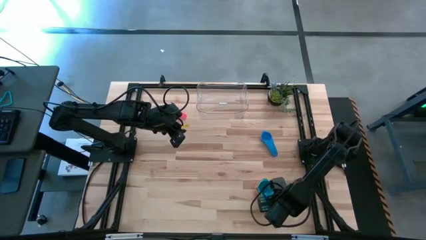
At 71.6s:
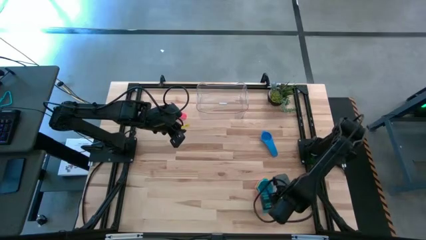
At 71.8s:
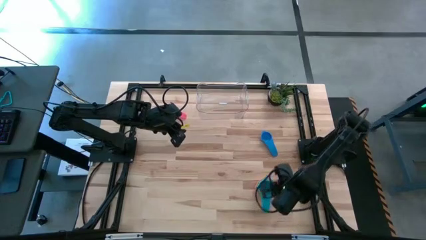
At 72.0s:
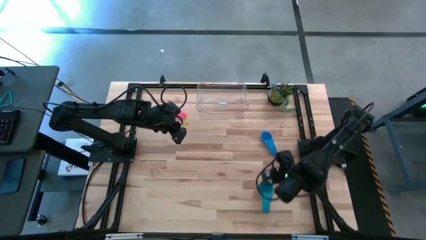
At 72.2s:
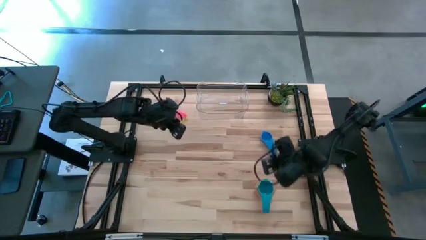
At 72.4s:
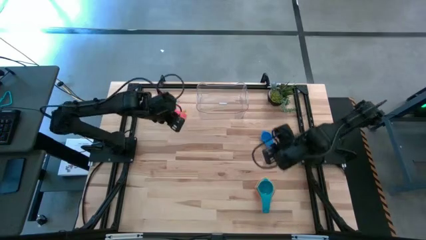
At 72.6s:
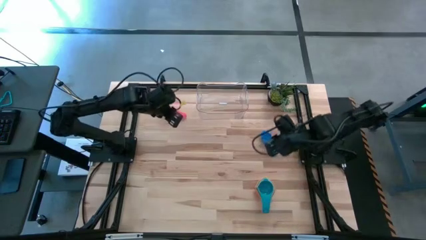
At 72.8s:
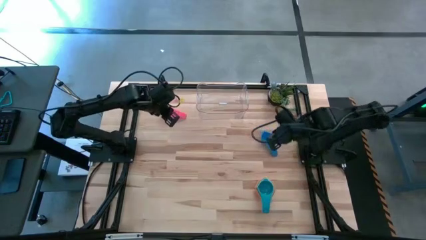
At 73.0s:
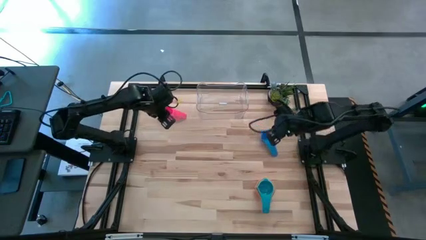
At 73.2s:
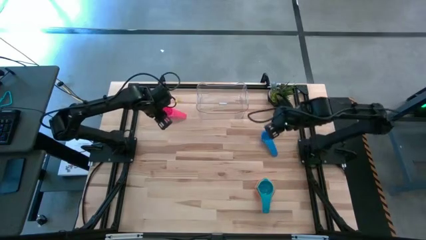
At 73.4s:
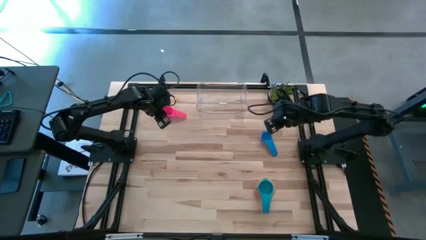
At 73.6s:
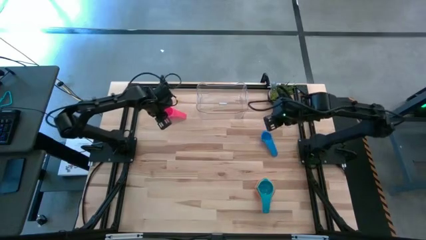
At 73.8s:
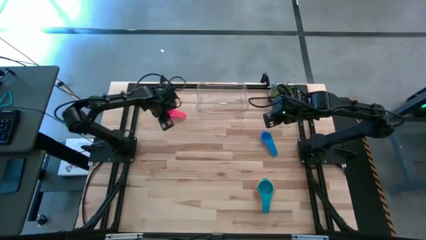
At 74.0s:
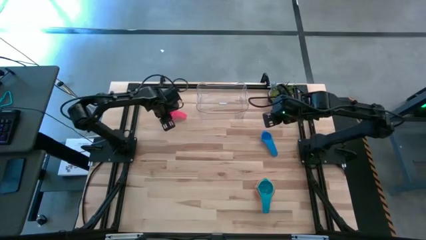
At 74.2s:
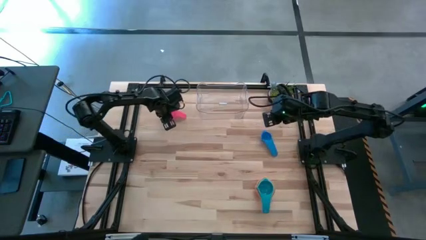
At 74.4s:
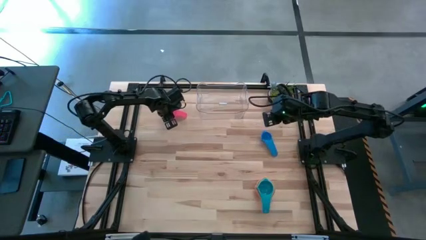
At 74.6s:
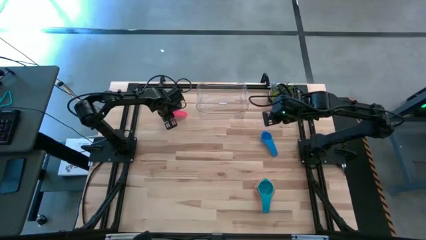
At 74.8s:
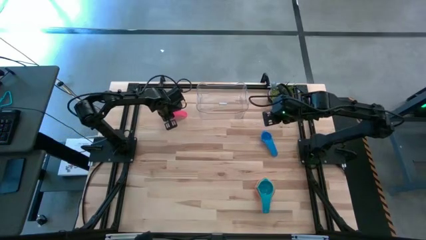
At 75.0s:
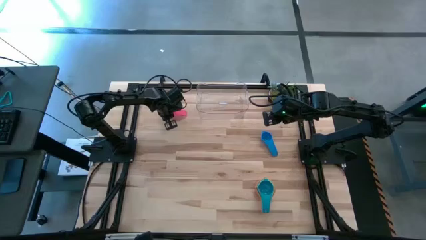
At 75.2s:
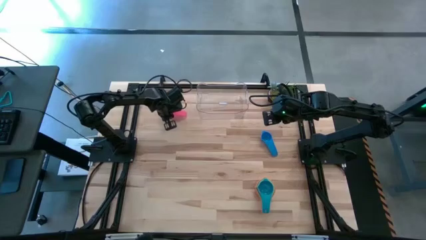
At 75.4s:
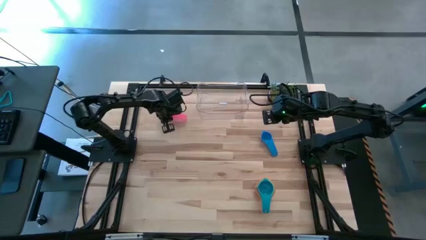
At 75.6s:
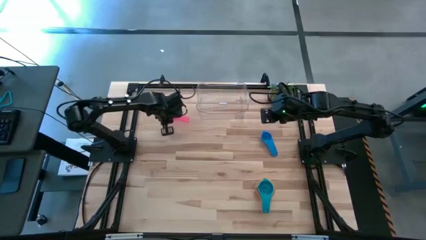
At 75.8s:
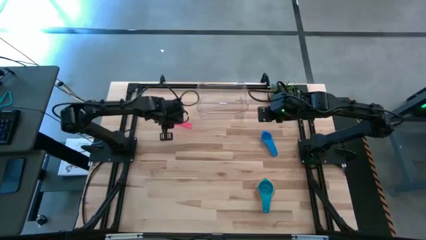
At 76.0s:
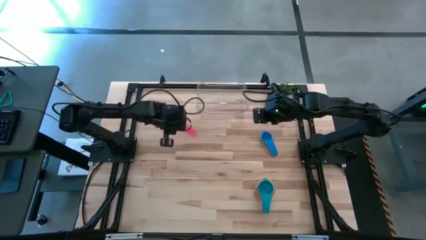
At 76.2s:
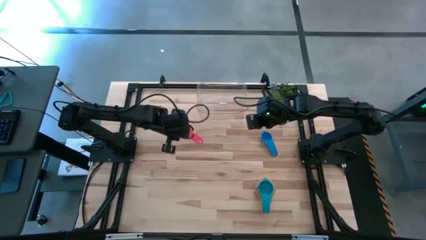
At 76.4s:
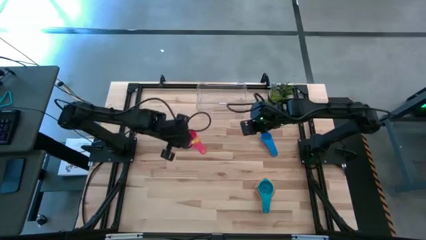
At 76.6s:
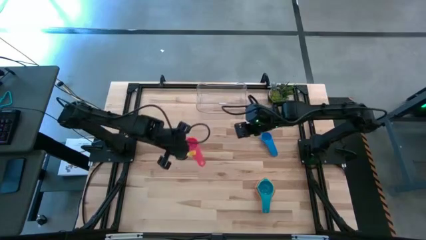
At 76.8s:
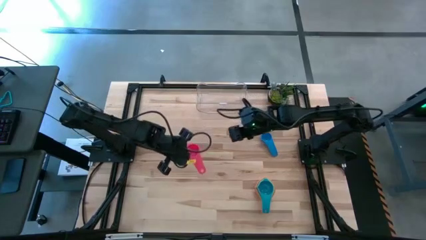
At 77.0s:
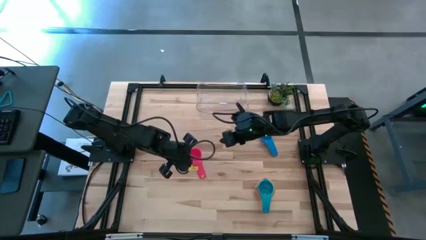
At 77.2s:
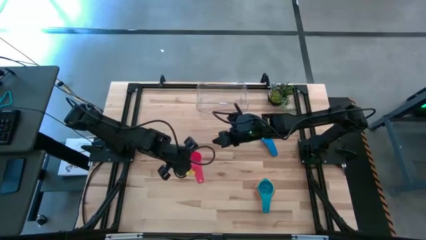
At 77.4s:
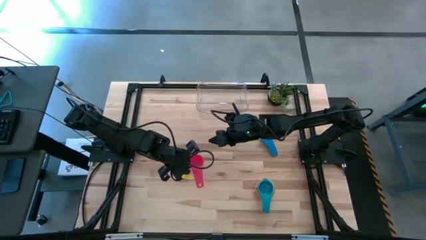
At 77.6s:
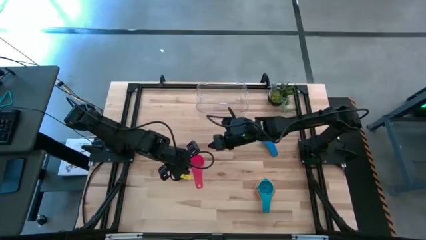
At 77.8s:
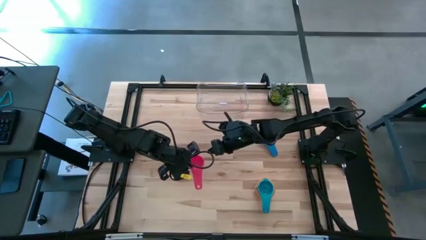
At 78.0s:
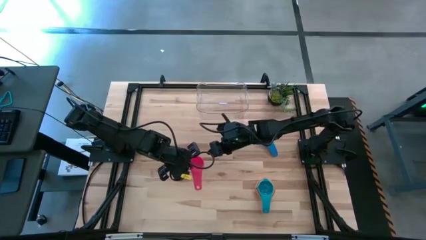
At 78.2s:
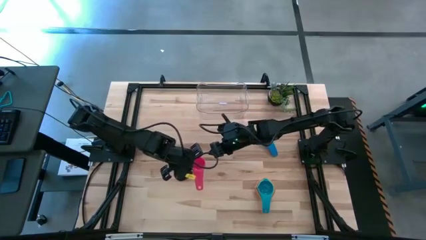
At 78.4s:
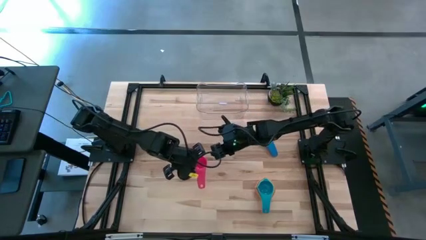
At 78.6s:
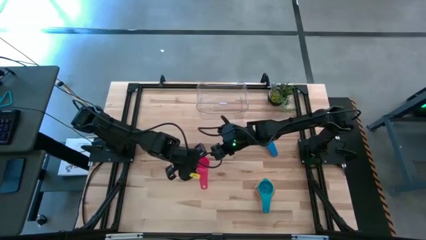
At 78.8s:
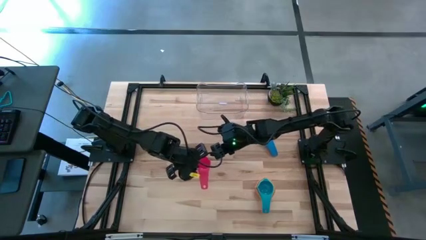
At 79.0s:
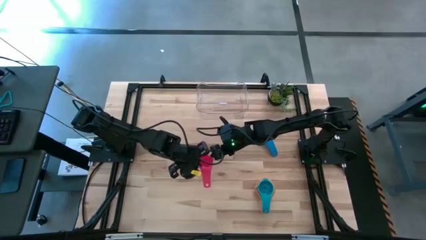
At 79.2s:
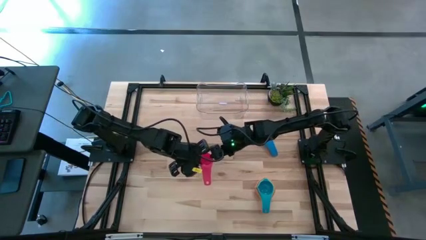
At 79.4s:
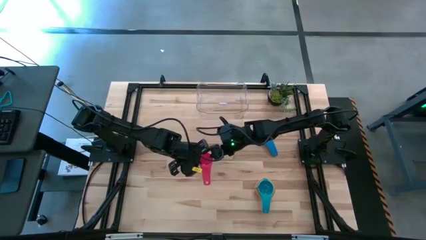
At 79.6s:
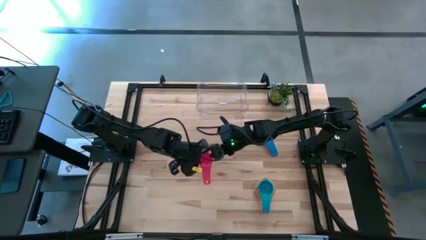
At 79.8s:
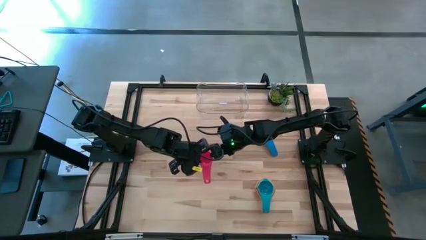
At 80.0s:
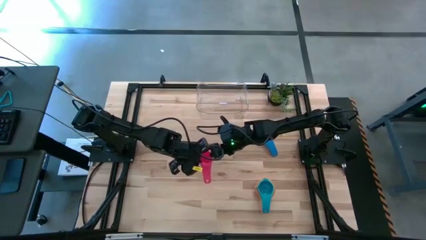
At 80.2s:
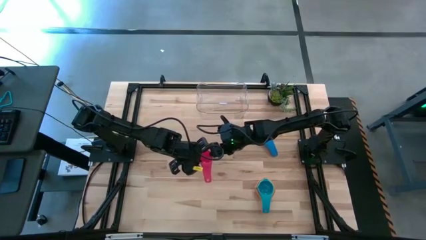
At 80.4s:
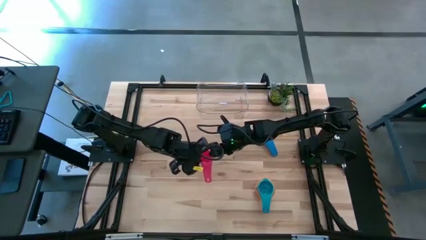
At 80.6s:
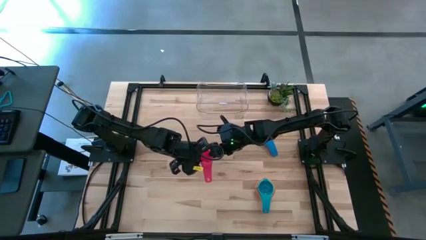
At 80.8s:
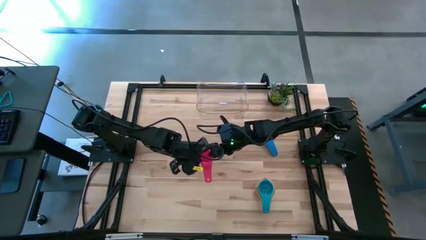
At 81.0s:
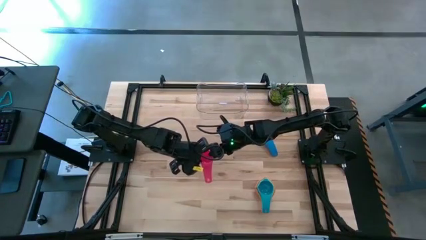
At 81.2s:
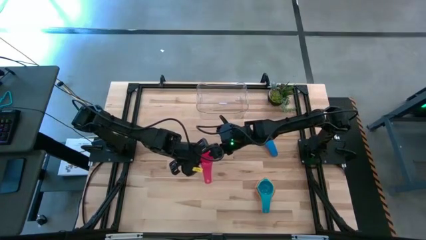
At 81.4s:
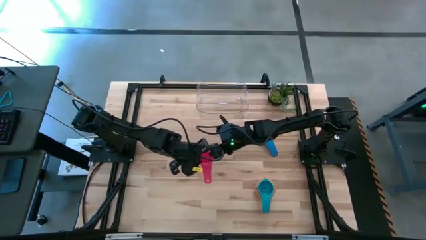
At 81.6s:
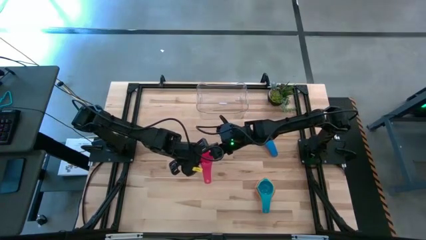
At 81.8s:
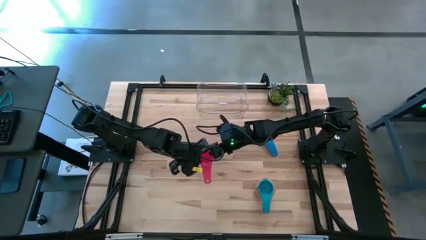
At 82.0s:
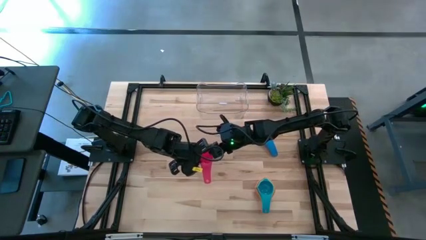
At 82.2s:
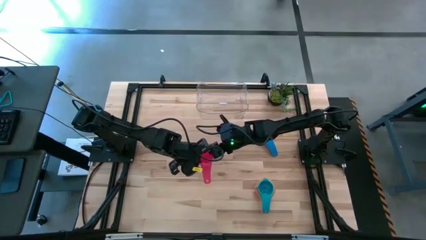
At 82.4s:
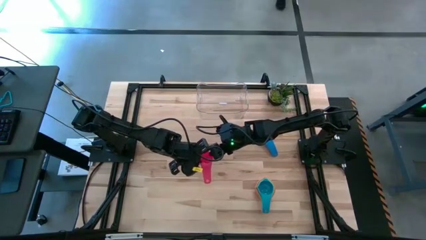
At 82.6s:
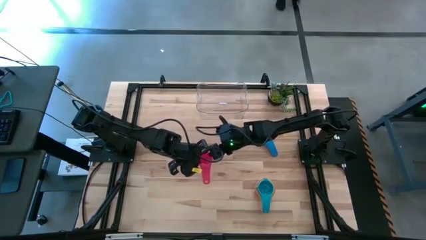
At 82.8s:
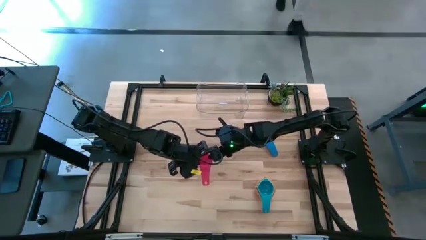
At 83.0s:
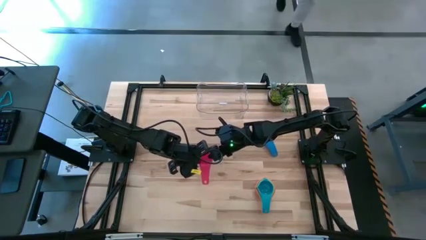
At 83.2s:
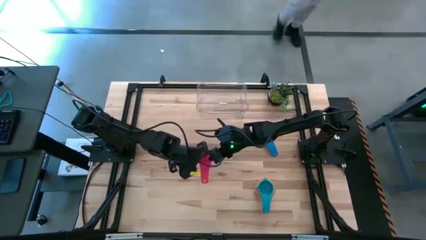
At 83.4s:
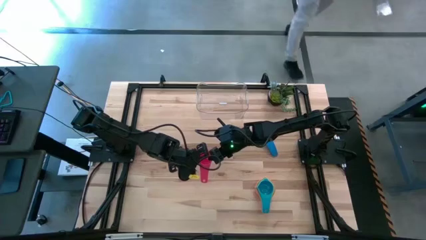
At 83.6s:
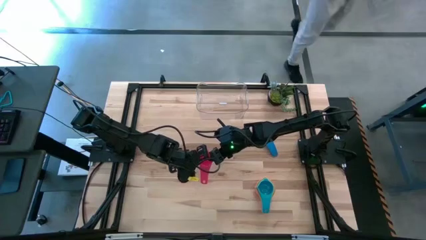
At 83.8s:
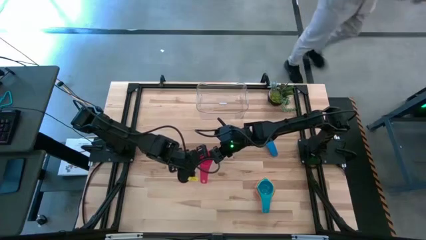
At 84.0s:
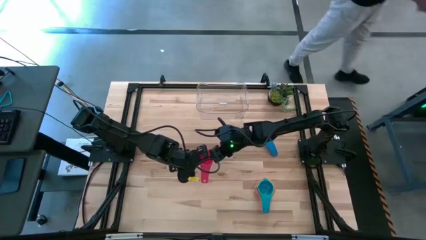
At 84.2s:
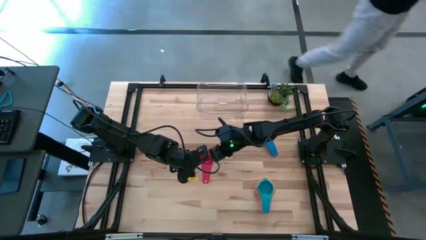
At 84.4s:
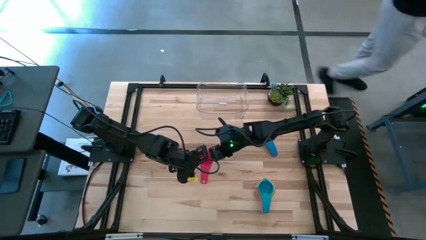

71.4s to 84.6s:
Task: Nest measuring cups in basket
Stack the red measuring cup on top of the other sky blue measuring cup

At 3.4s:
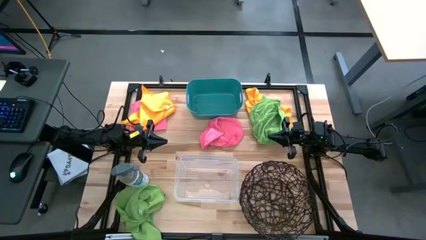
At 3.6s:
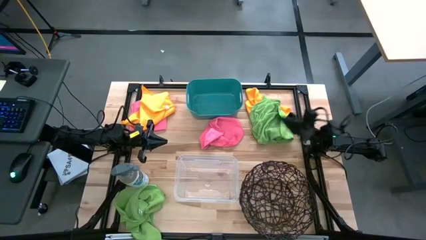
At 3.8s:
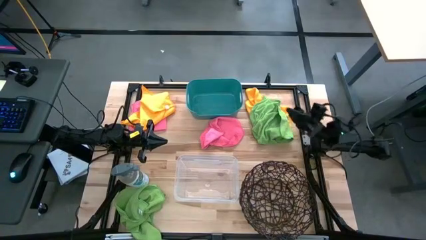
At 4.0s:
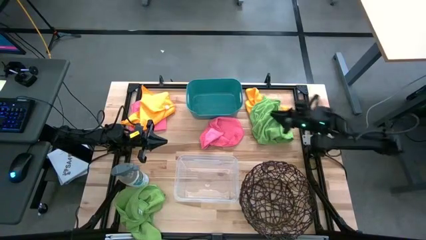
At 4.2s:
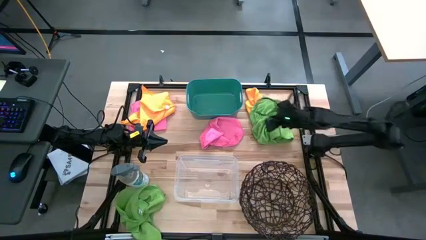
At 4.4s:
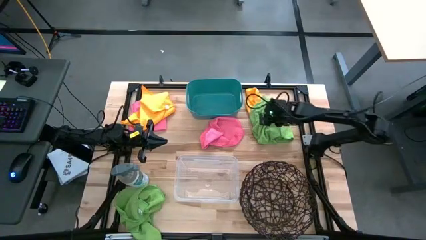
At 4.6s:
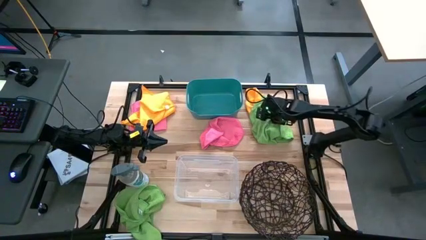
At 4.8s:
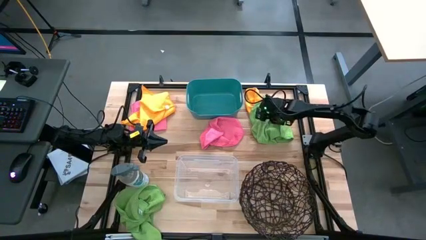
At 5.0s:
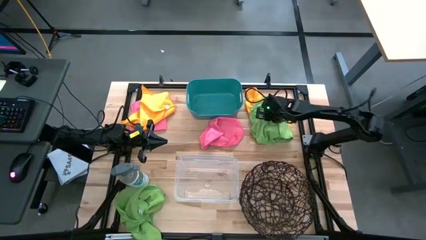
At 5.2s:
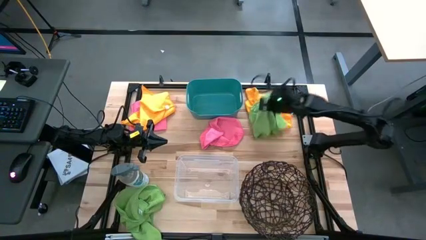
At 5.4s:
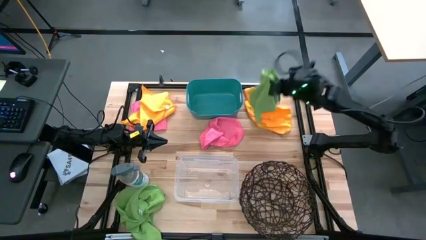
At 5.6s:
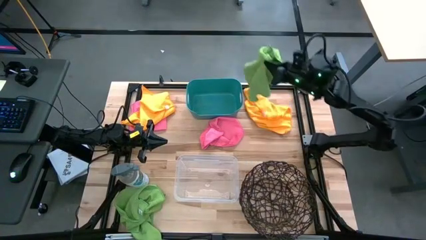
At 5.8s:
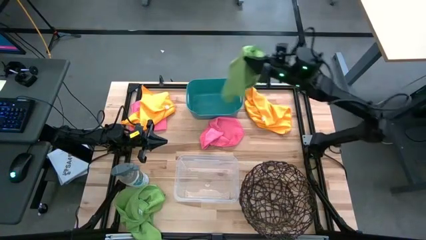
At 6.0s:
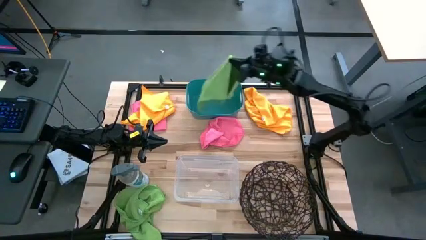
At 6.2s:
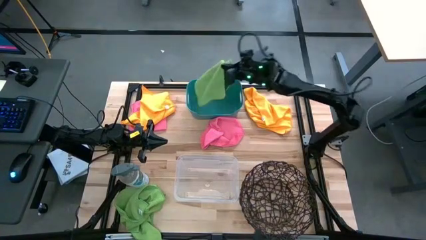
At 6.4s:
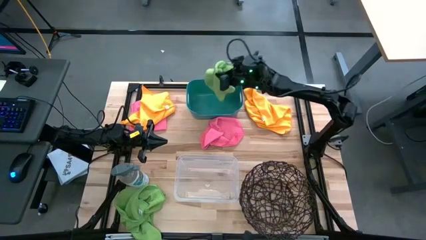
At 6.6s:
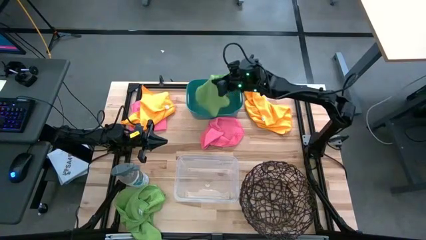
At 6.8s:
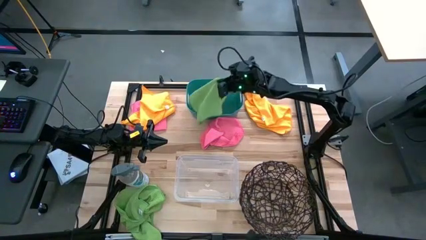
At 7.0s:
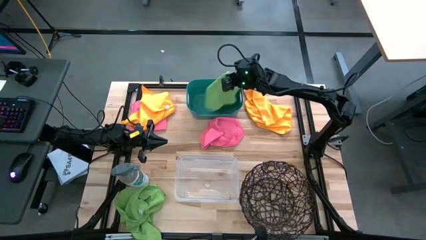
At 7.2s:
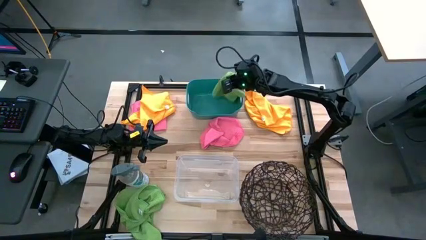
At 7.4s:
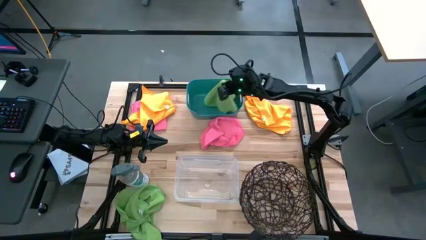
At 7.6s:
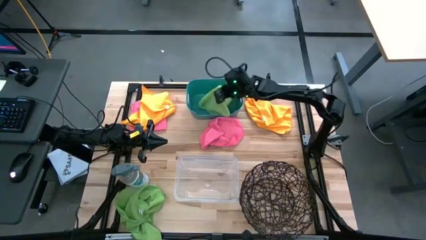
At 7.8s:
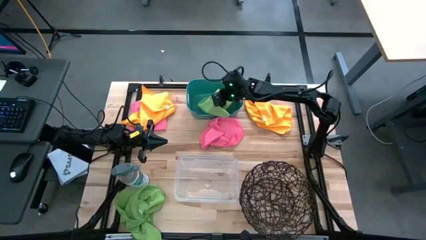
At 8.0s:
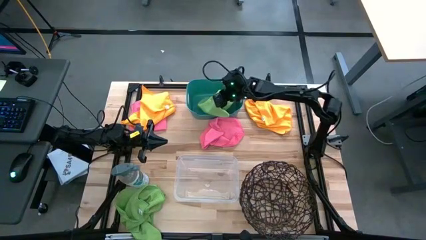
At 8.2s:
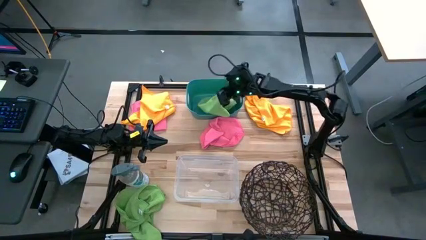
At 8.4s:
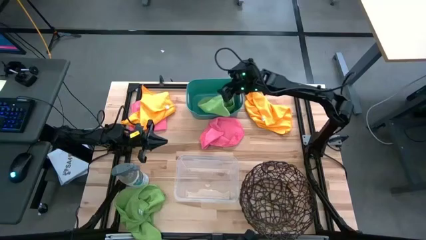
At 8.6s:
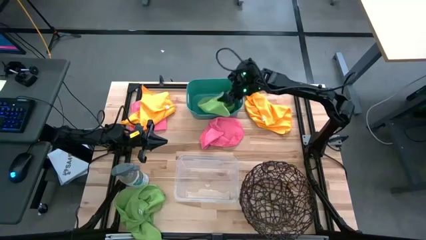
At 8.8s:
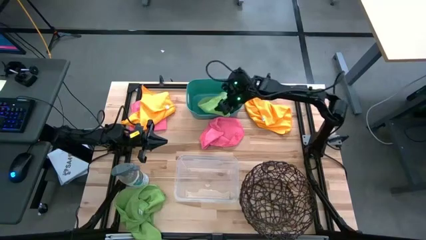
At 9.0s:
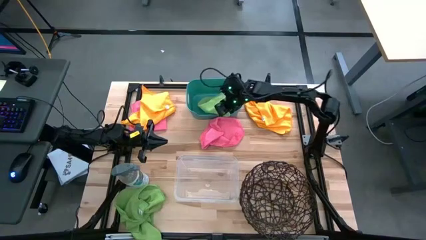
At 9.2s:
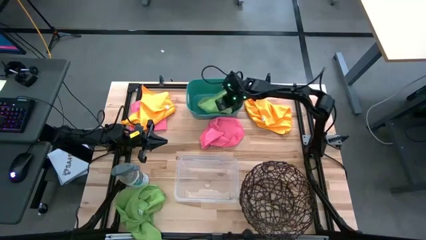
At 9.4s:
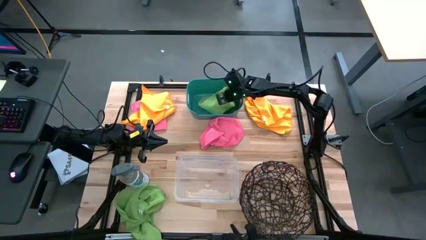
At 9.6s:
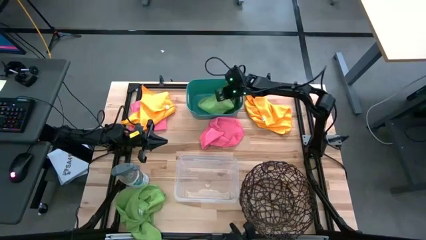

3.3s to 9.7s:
Task: Sort microfiber towel by color & place in baskets
Put the top green microfiber cloth into the green bin
